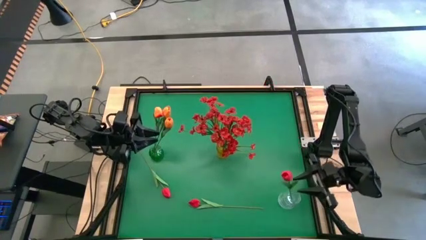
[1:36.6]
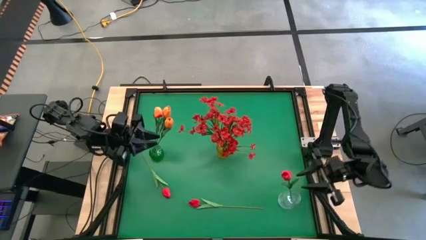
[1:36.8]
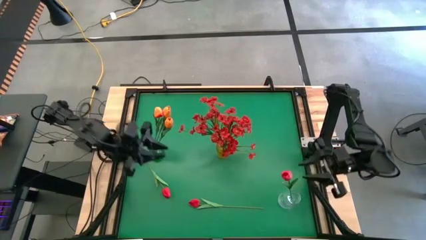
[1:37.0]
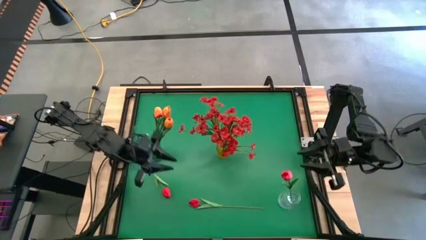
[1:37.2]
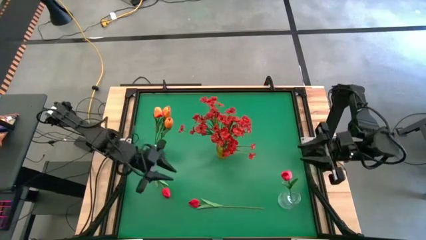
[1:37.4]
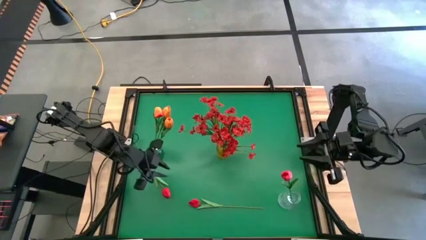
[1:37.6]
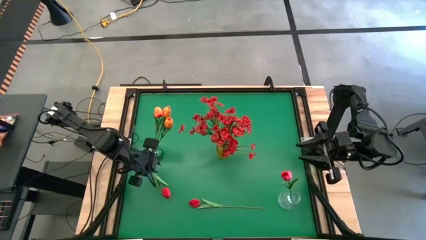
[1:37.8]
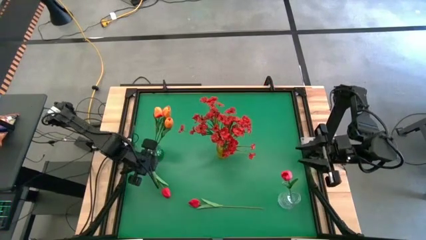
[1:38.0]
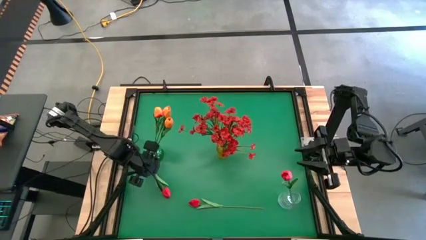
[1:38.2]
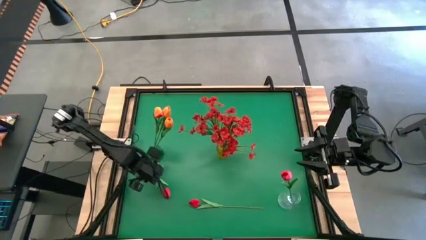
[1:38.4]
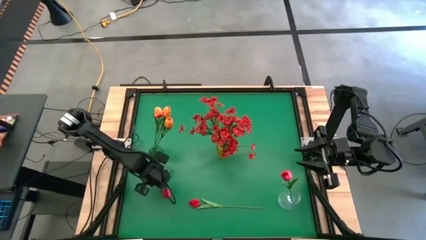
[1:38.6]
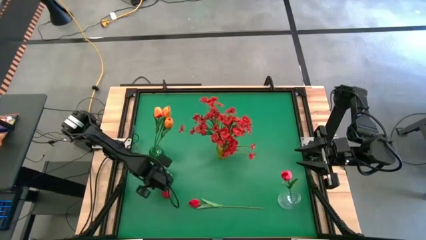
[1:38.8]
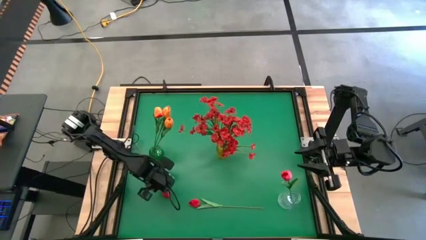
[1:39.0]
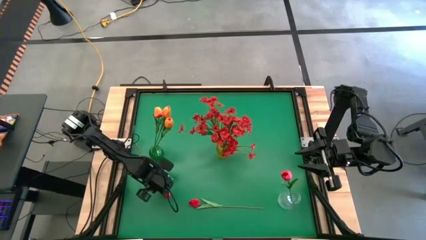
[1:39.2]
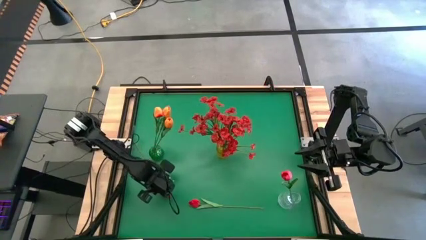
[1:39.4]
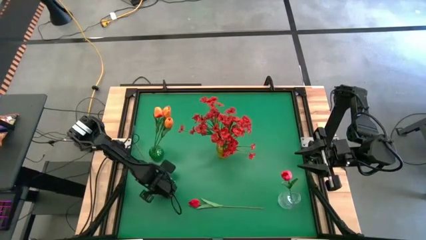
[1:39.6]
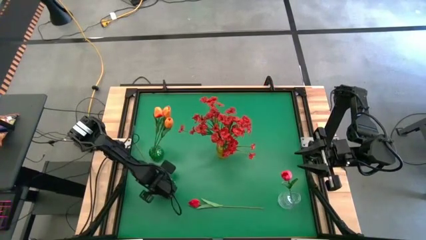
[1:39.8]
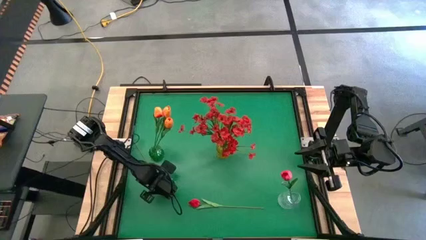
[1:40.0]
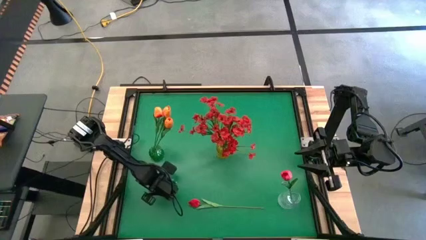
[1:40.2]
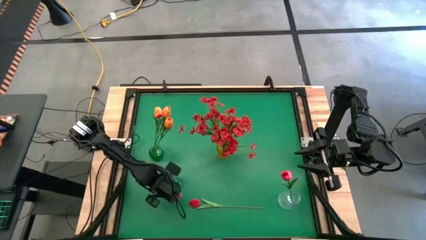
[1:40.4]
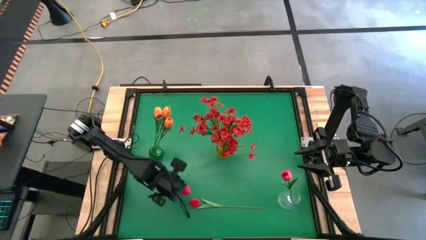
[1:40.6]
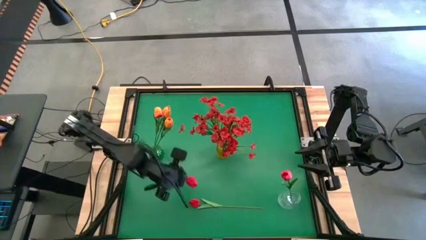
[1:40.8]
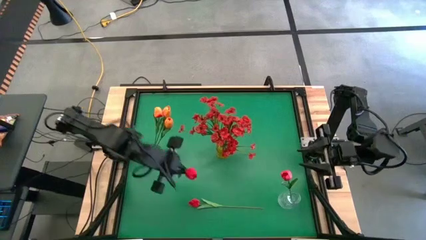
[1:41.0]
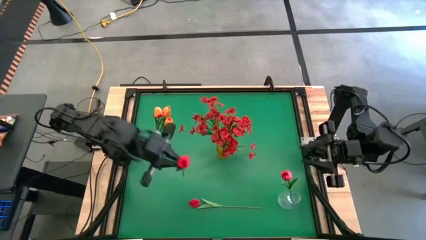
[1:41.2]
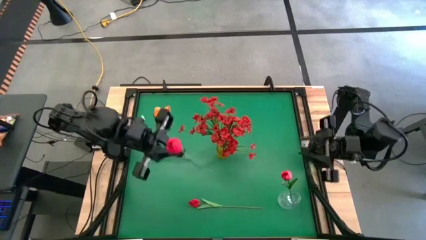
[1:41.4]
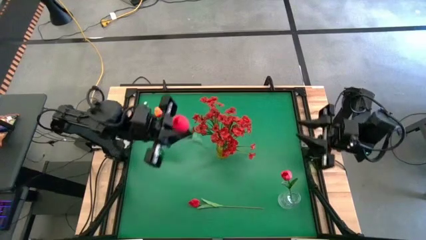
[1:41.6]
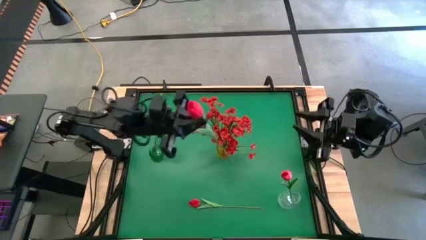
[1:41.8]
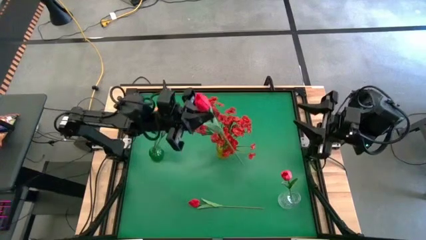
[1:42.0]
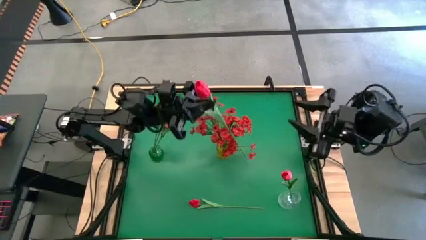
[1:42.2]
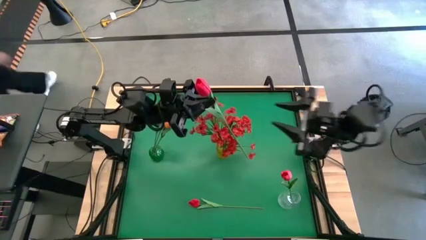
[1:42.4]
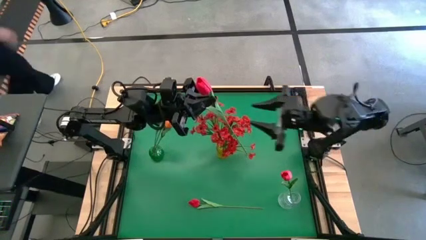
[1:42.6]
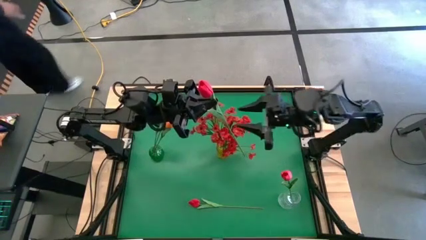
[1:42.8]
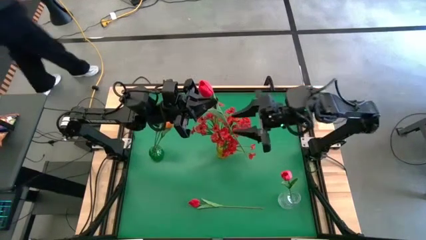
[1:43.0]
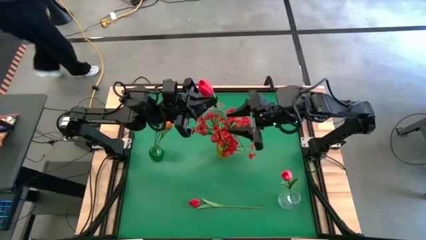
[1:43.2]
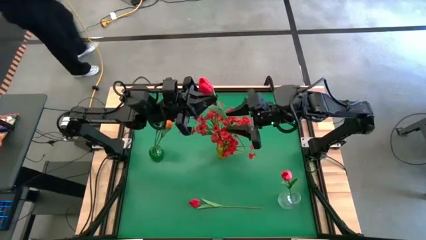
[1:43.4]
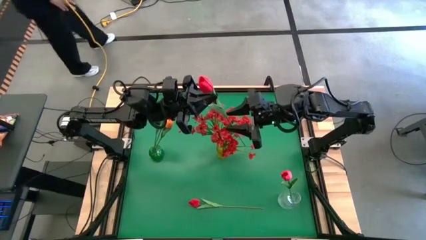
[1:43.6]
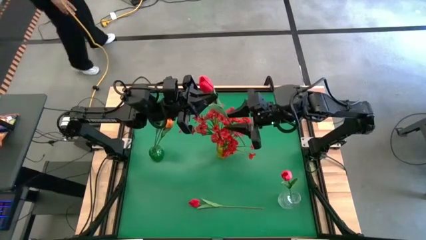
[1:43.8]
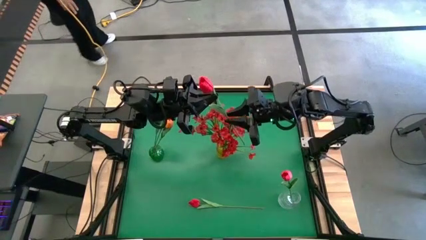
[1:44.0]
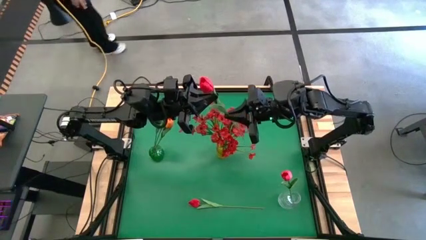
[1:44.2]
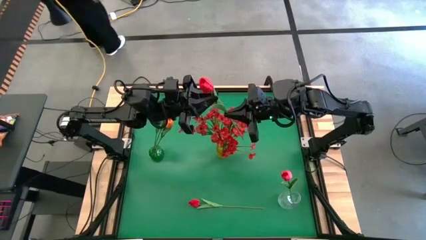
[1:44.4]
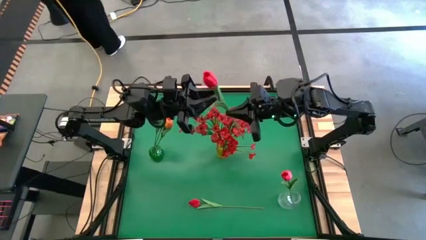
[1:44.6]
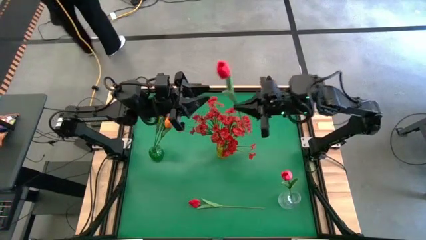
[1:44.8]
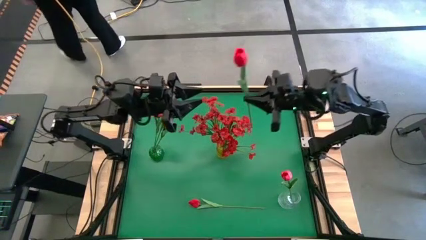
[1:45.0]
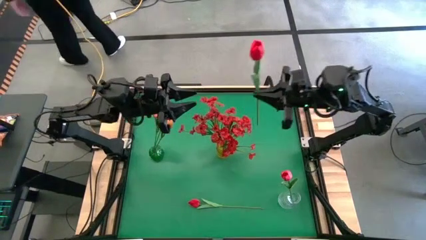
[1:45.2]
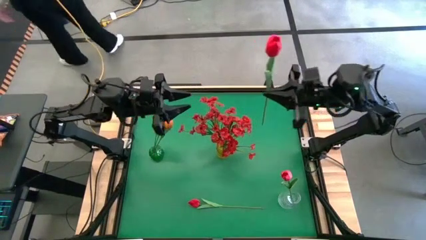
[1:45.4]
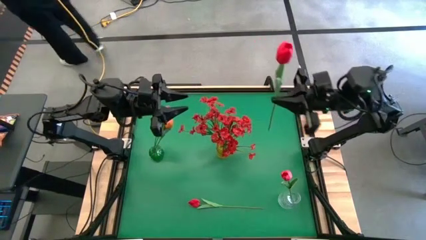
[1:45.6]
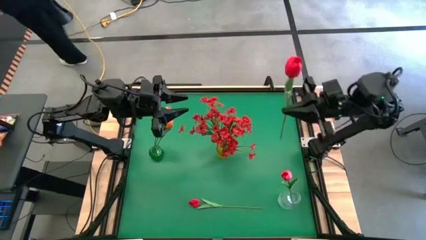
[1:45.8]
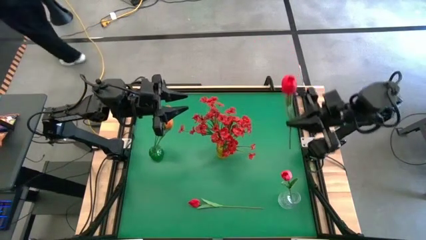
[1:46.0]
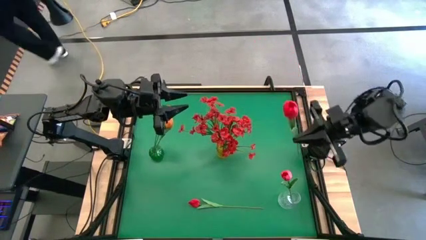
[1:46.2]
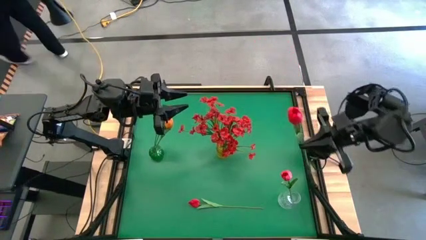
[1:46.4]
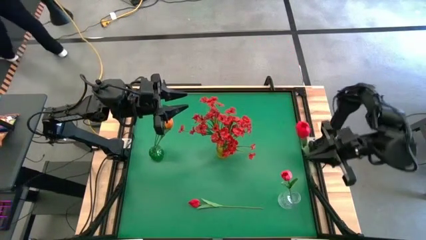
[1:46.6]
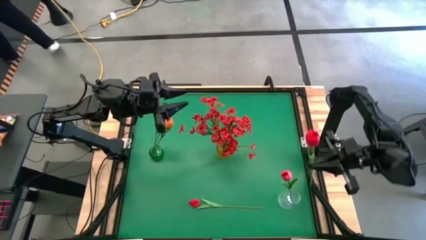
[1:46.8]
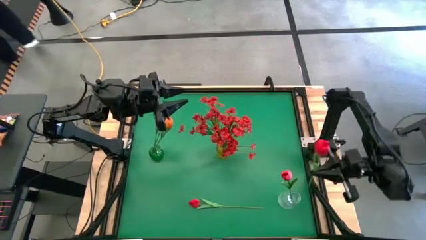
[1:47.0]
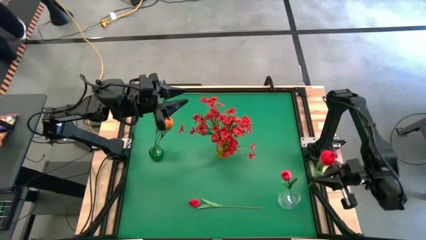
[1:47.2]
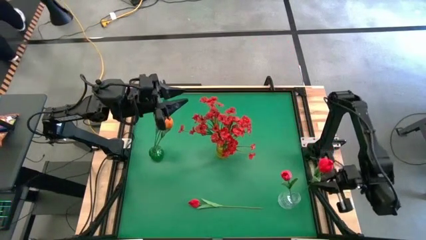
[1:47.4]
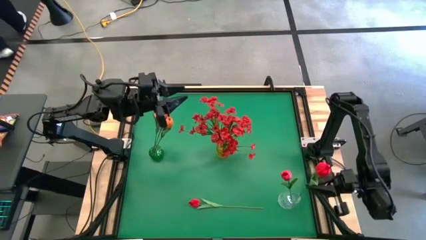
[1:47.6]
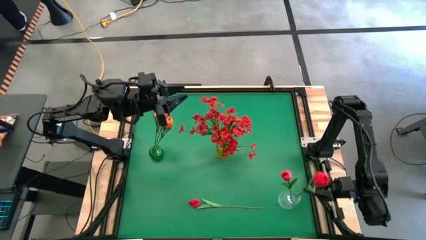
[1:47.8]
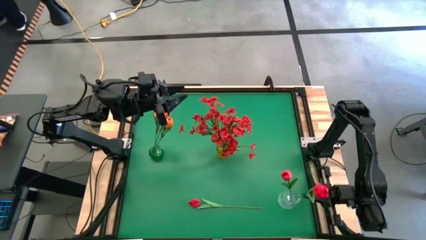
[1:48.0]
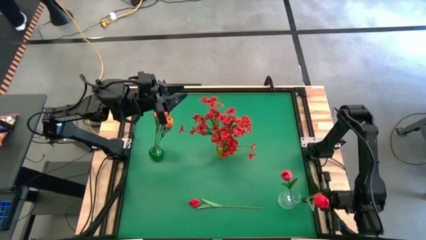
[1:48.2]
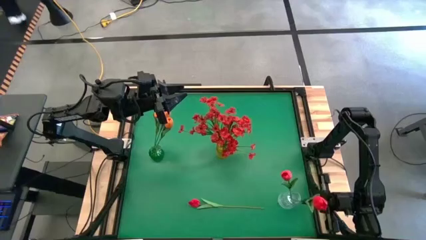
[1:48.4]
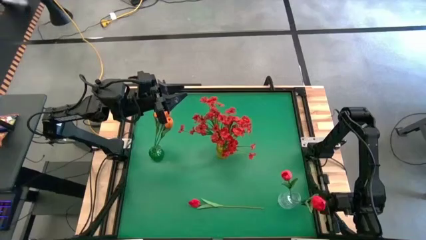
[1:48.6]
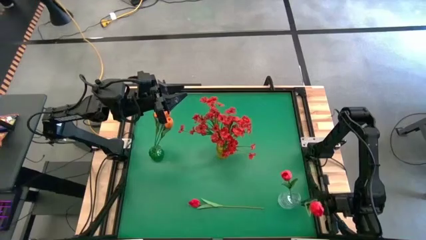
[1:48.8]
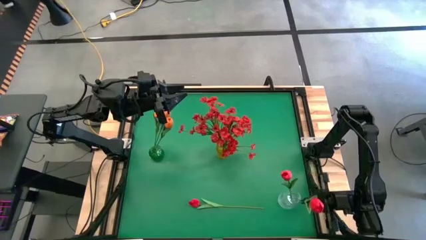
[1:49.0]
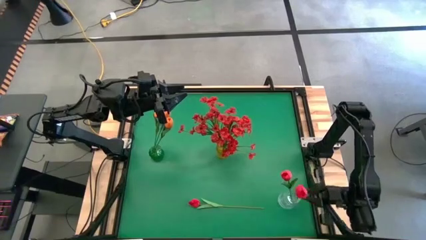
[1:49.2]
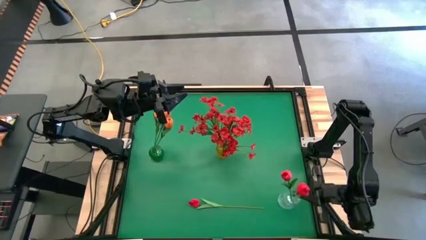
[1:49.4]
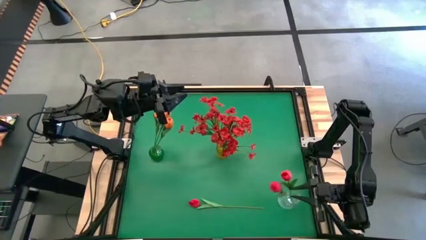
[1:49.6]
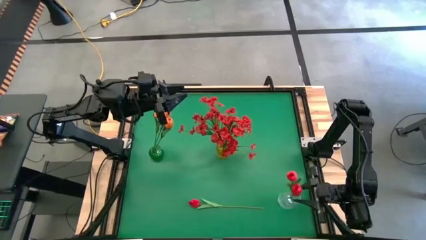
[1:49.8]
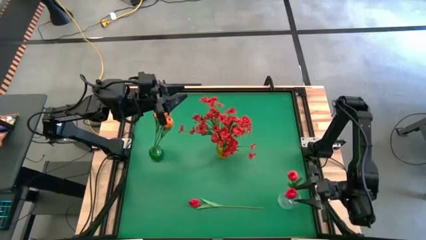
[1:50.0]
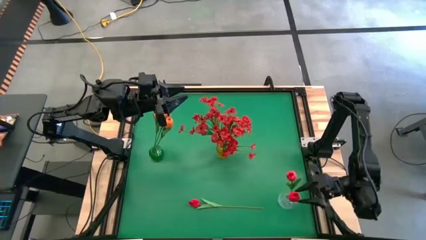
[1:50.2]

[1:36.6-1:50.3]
Task: Sort flowers into vase by color
Put the left red flower into the transparent vase
